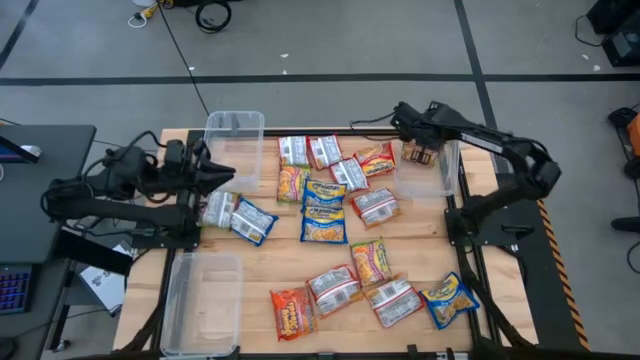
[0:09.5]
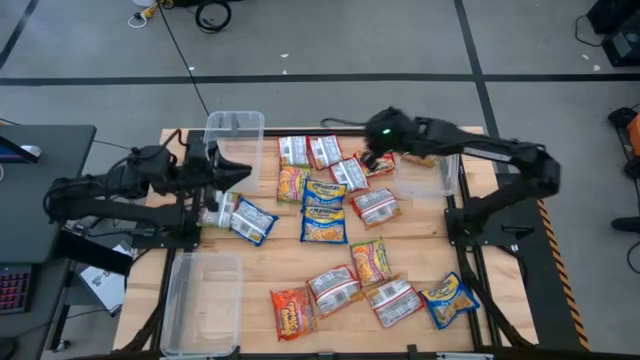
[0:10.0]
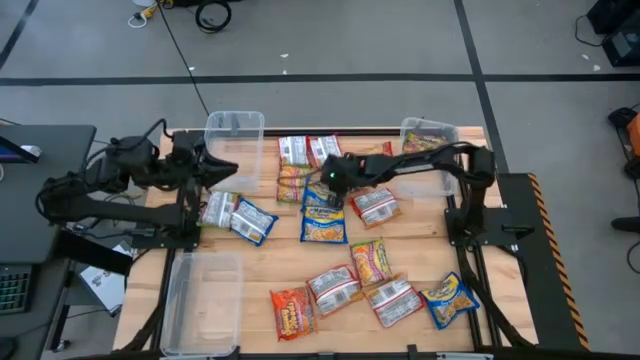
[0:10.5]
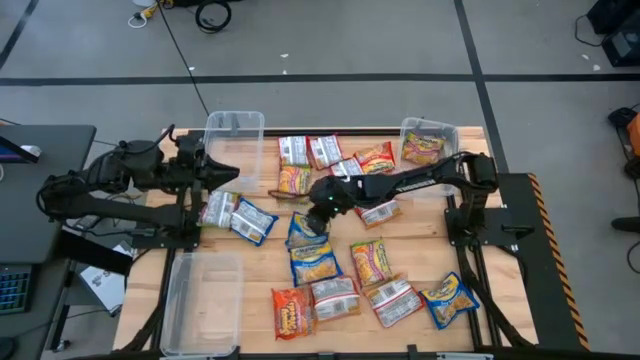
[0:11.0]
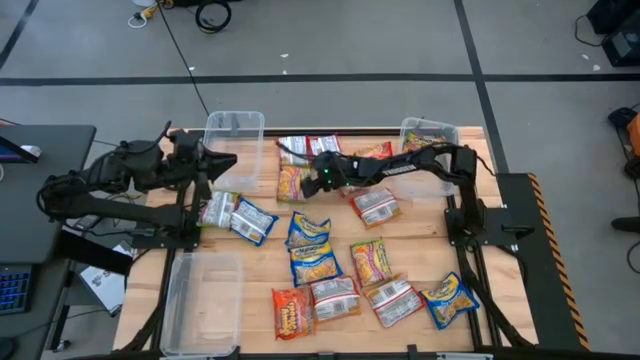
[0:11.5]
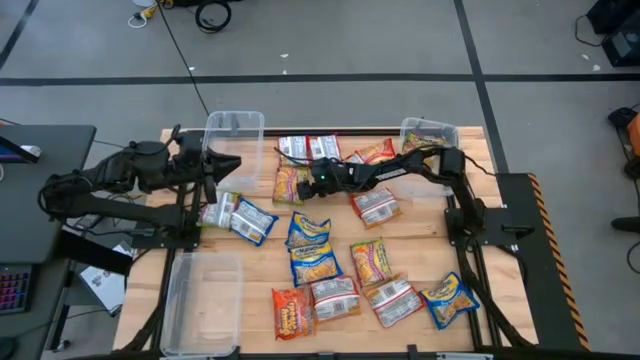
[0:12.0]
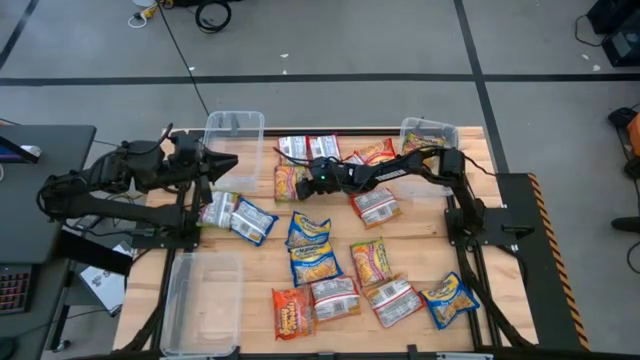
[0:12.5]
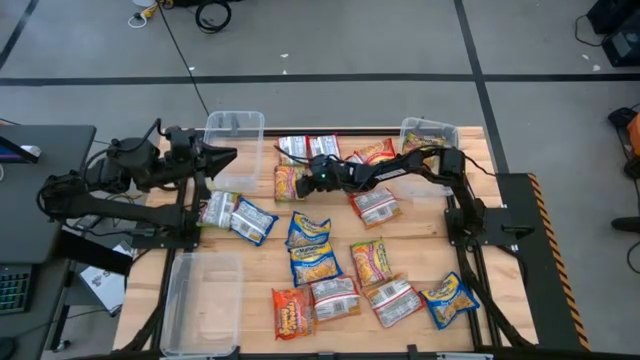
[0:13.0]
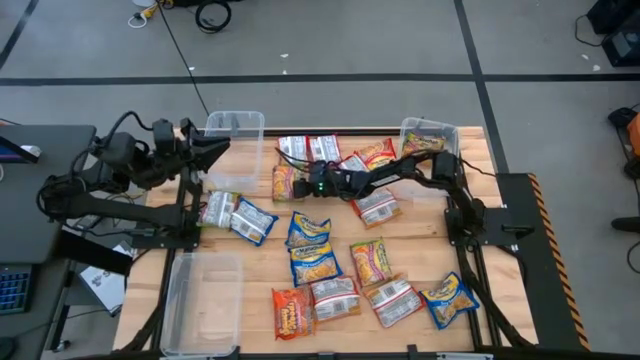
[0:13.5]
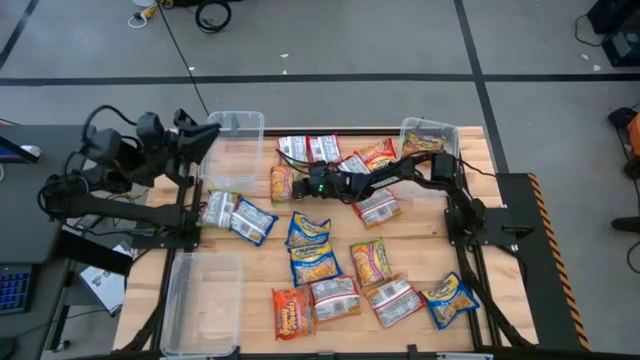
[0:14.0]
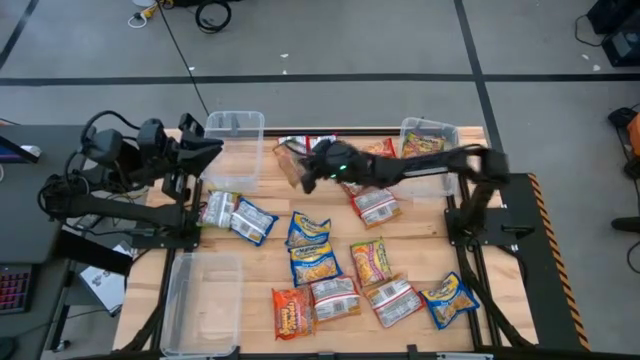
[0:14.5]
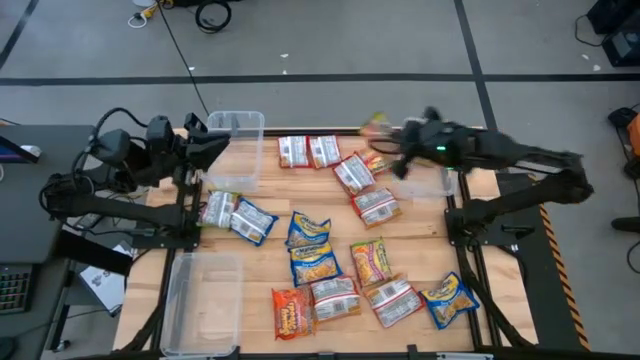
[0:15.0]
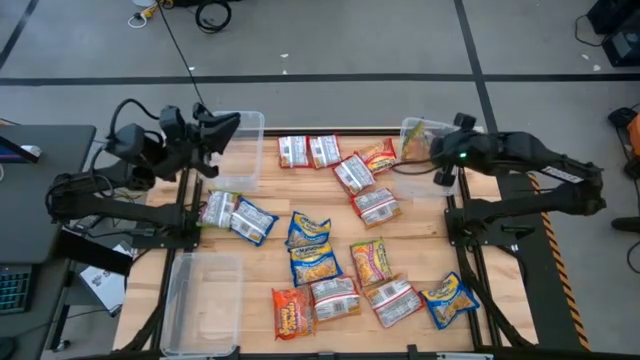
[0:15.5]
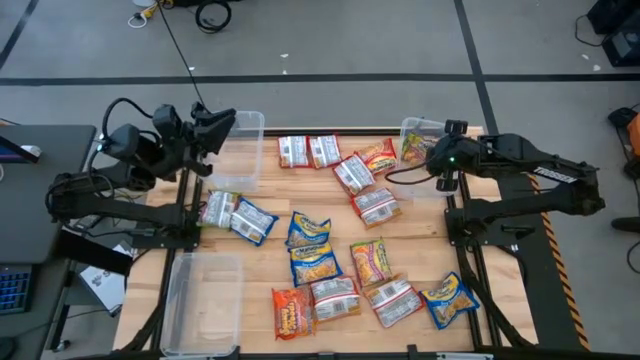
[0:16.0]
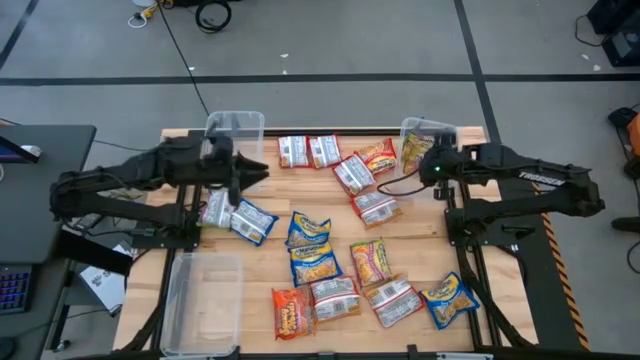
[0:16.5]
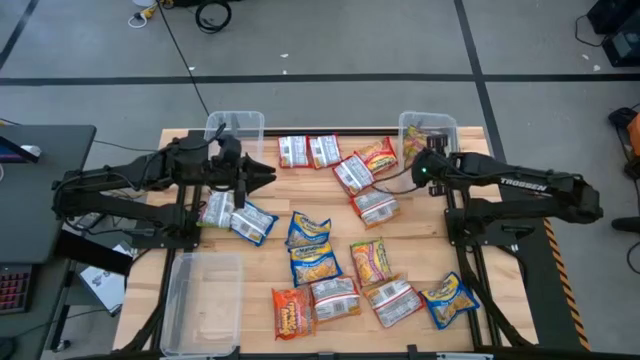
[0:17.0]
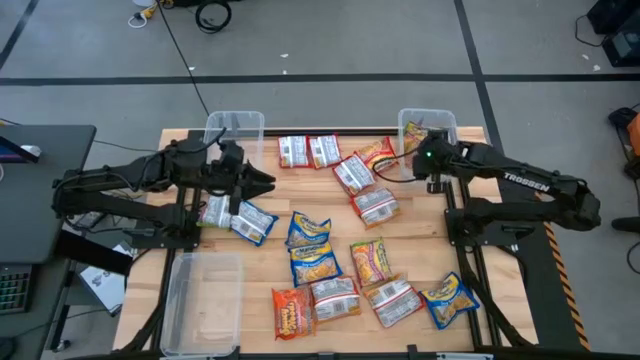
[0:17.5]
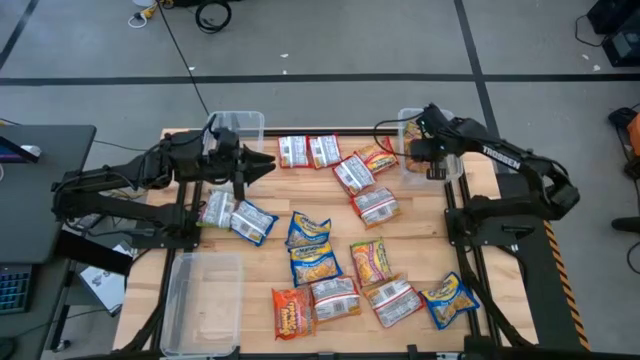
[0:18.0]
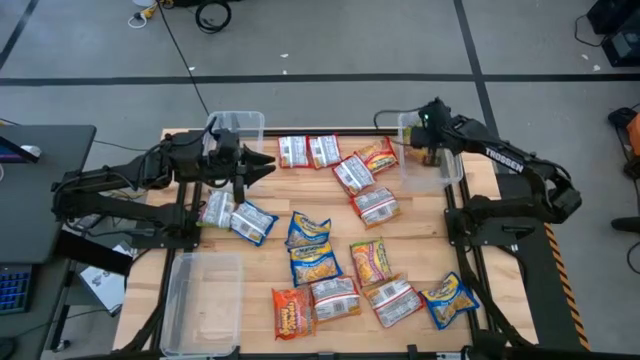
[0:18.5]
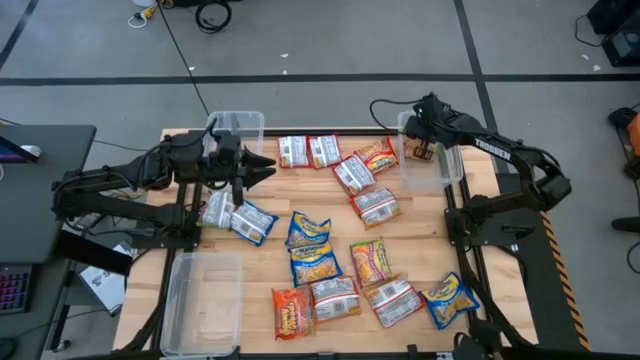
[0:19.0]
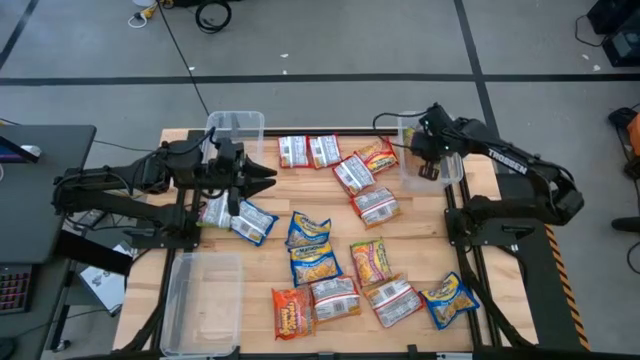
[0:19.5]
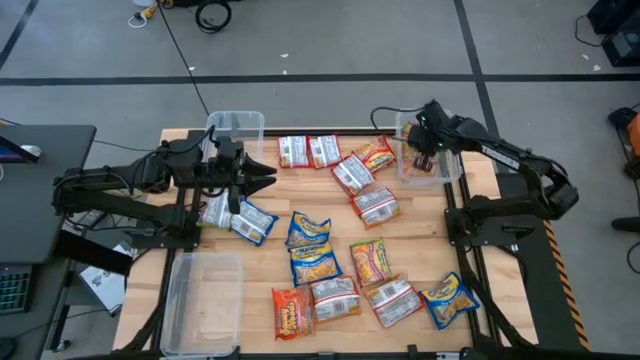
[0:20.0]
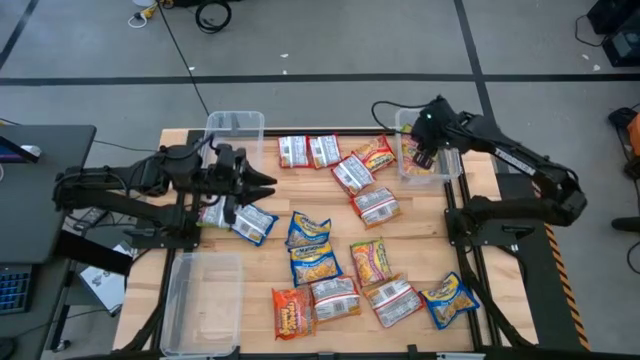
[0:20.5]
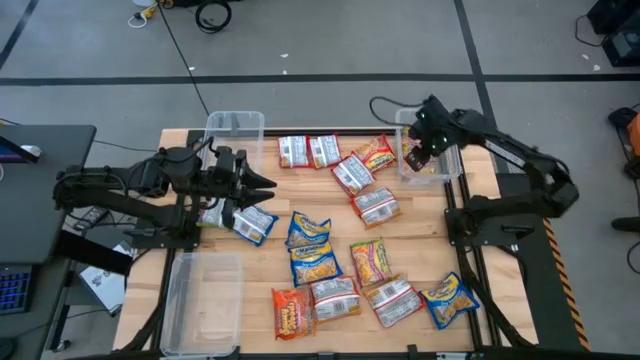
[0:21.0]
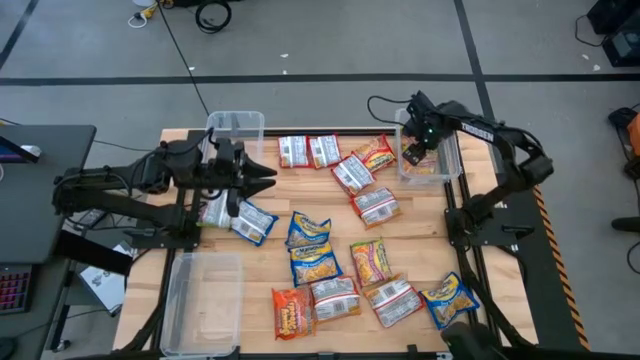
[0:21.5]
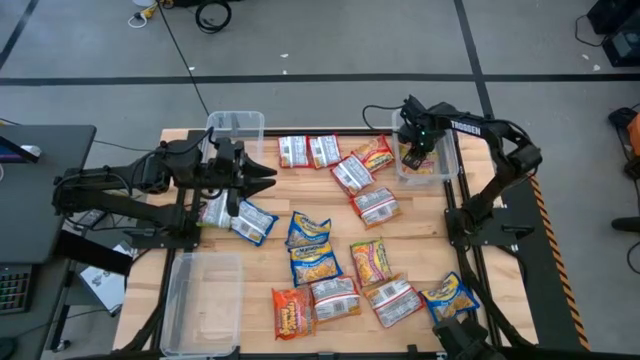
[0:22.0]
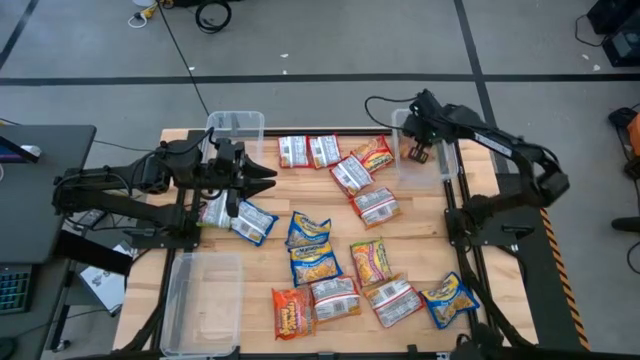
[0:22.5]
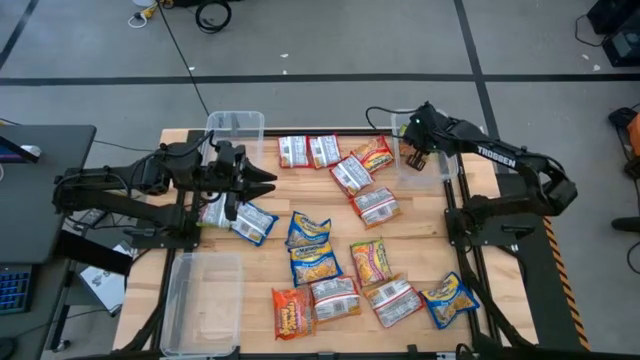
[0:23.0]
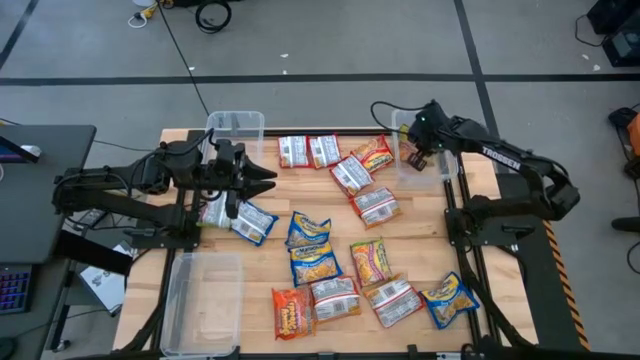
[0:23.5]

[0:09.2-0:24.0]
Task: Sort Maruchan noodles
Put the green noodle pack into the top right transparent bin

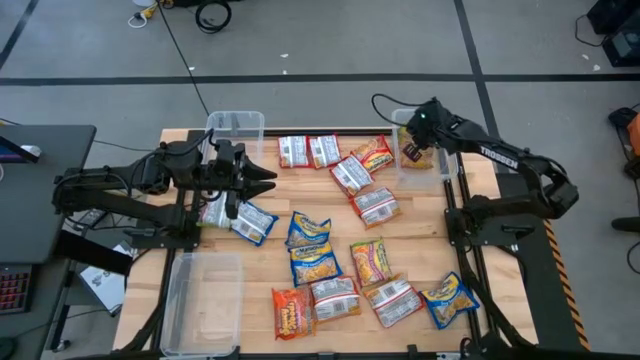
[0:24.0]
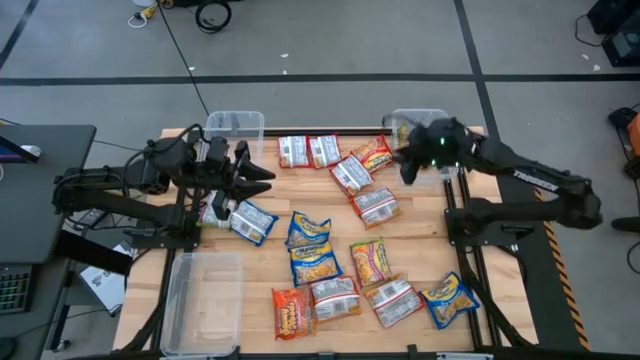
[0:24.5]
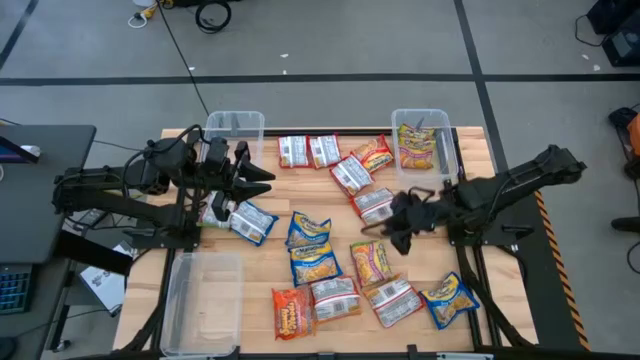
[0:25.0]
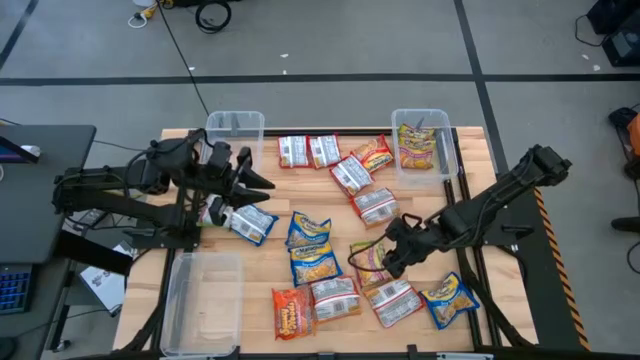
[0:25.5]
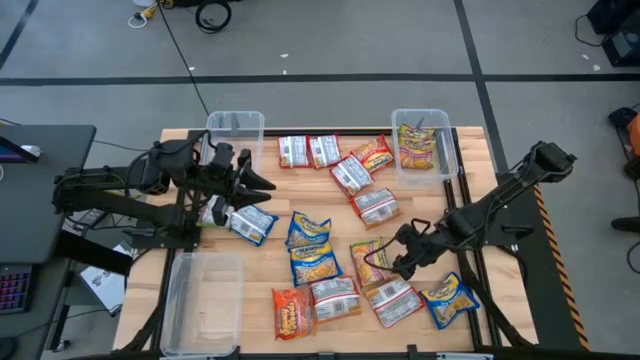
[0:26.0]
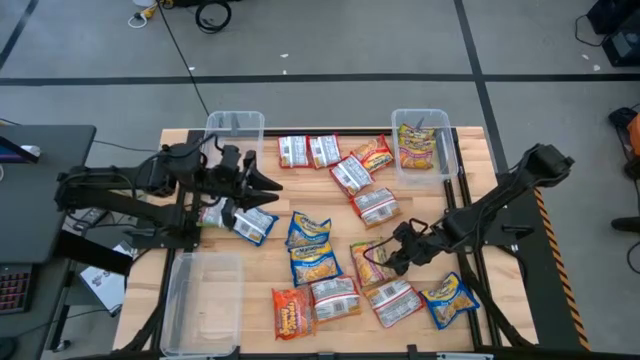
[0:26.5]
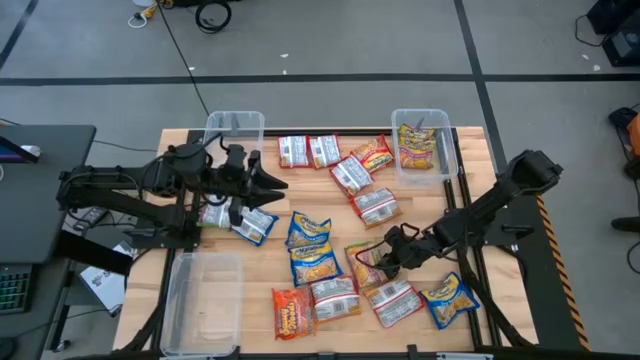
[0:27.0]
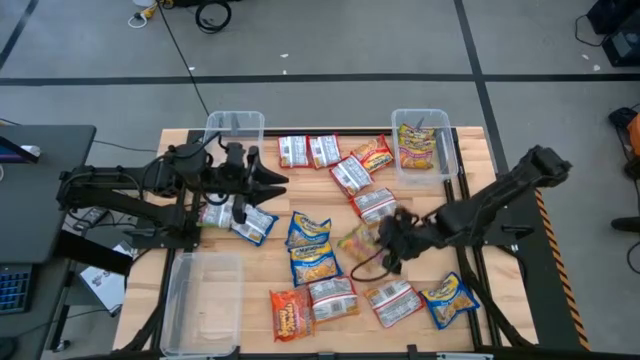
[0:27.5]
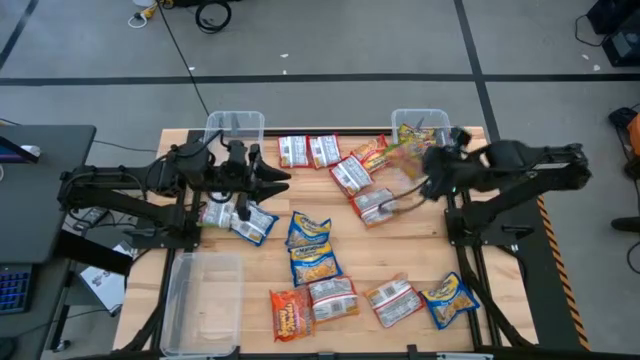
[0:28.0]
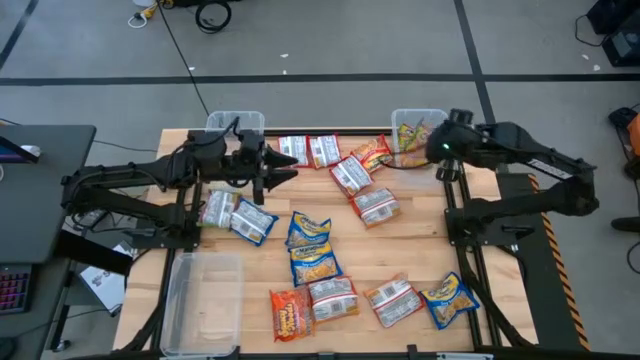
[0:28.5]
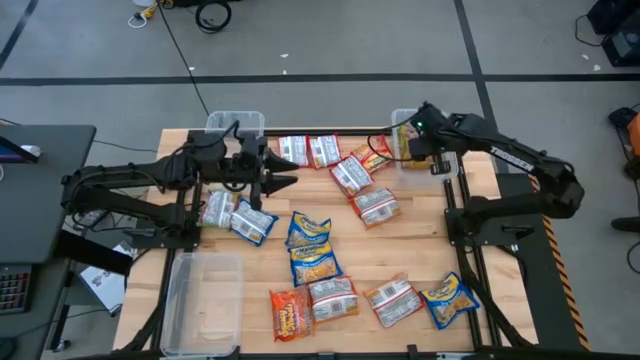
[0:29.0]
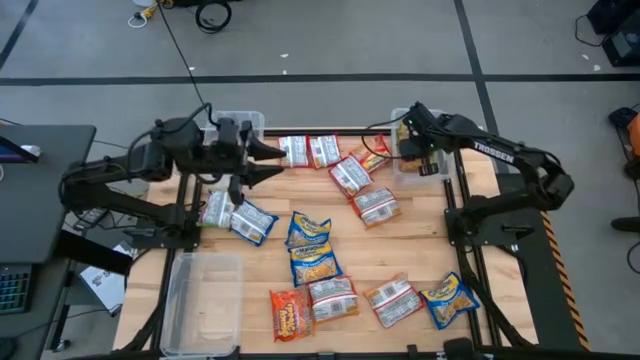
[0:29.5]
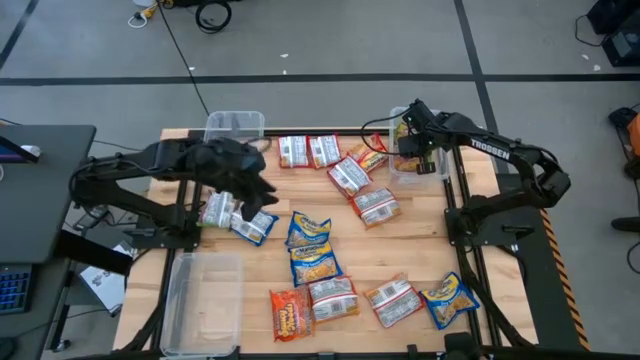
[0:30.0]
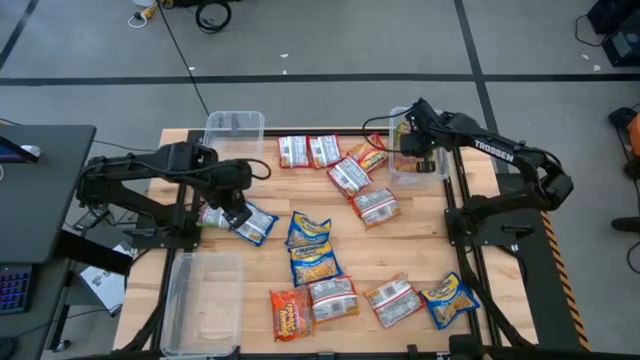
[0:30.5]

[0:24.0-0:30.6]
Put the green noodle pack into the top right transparent bin
